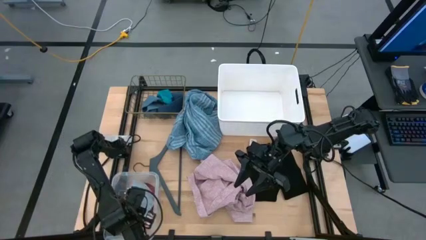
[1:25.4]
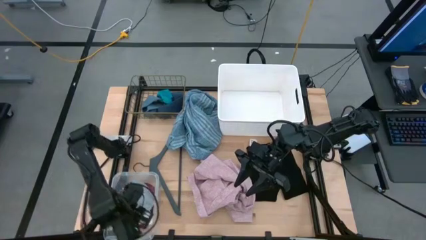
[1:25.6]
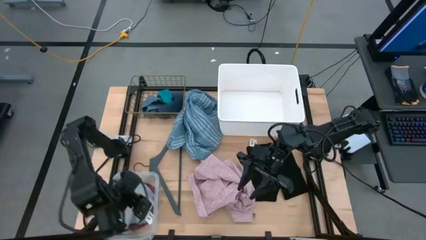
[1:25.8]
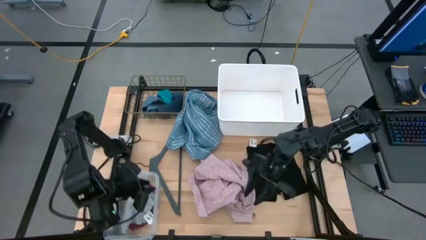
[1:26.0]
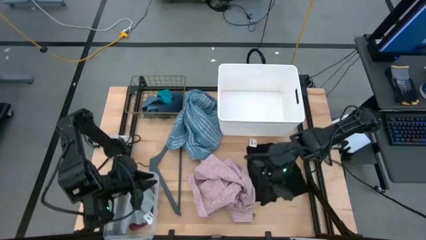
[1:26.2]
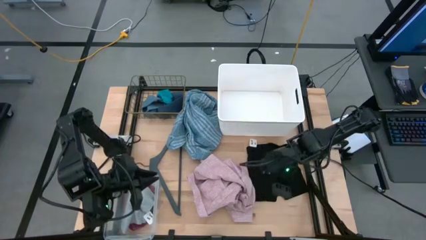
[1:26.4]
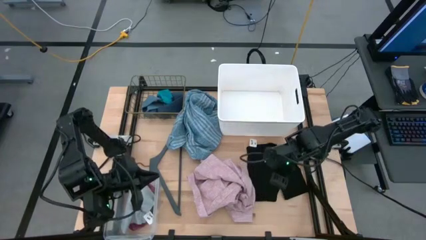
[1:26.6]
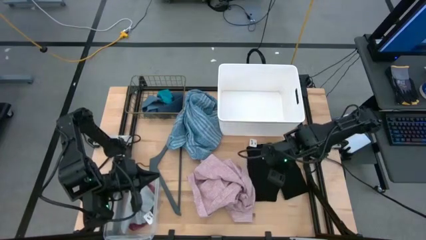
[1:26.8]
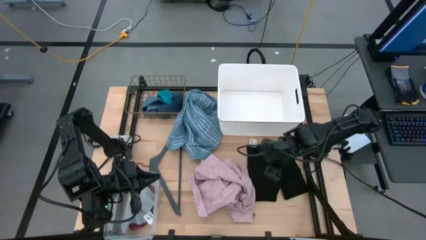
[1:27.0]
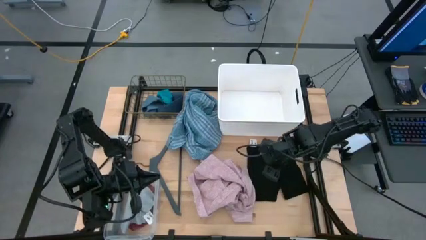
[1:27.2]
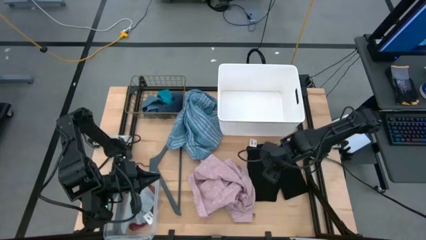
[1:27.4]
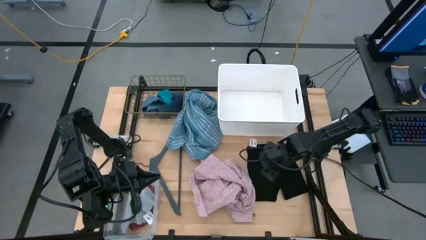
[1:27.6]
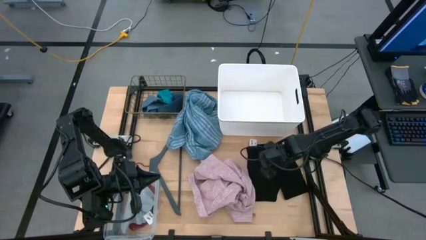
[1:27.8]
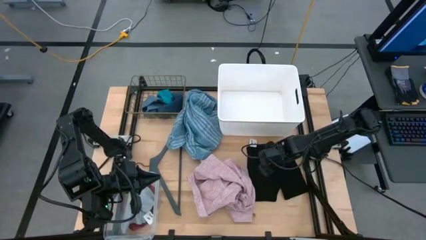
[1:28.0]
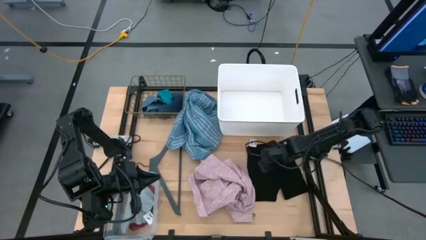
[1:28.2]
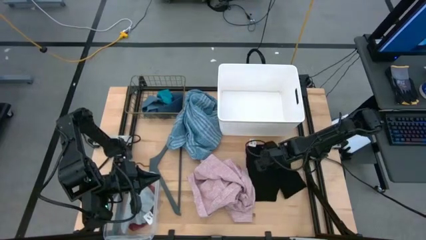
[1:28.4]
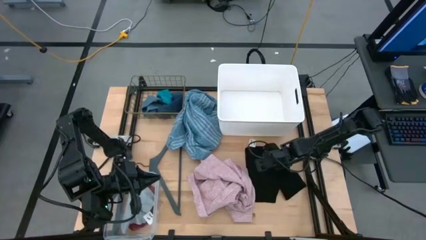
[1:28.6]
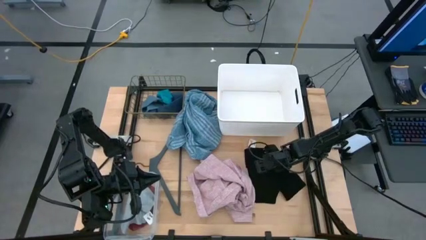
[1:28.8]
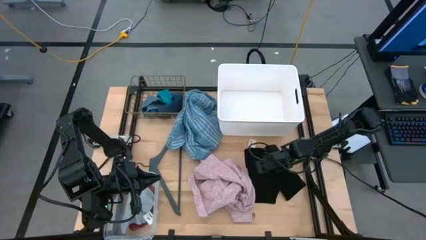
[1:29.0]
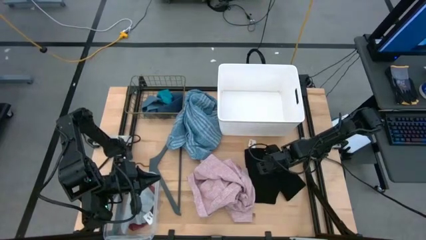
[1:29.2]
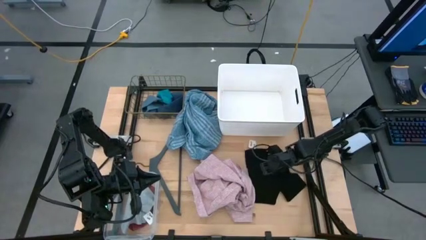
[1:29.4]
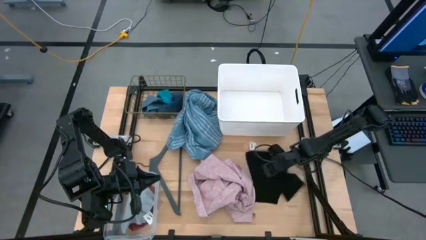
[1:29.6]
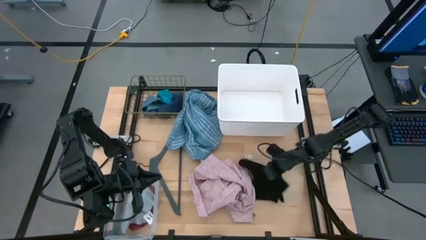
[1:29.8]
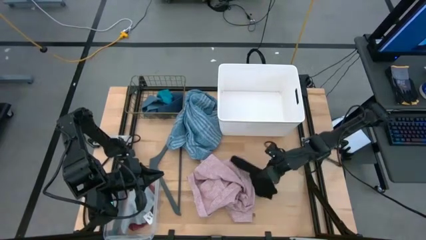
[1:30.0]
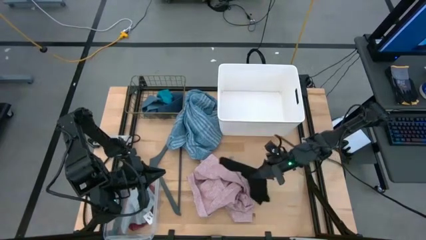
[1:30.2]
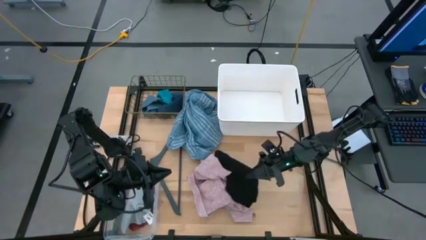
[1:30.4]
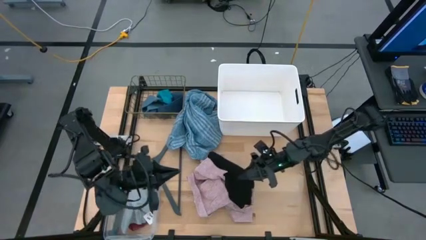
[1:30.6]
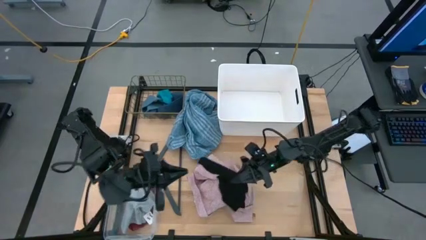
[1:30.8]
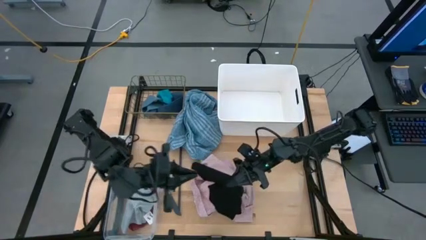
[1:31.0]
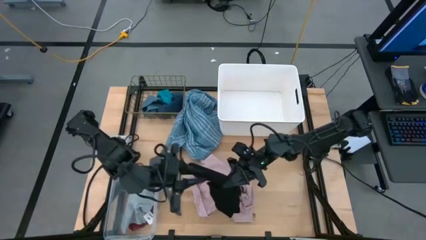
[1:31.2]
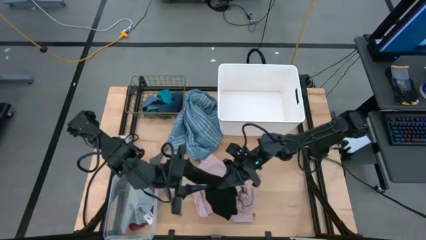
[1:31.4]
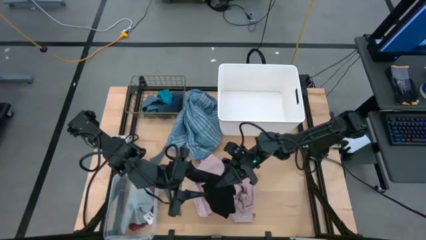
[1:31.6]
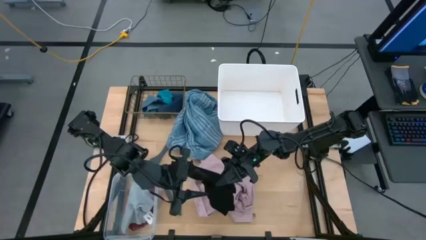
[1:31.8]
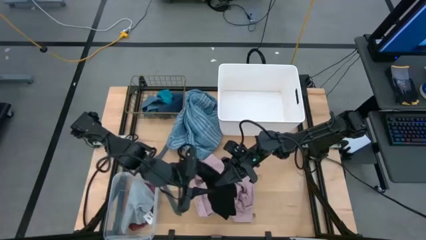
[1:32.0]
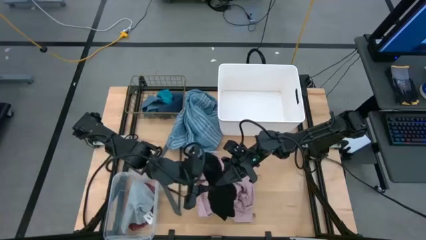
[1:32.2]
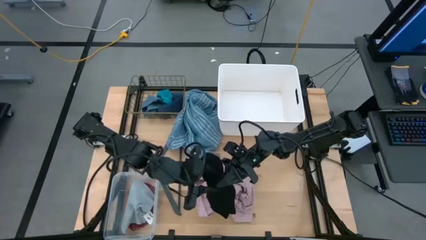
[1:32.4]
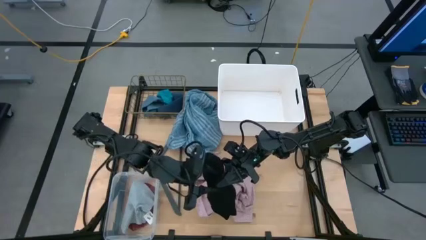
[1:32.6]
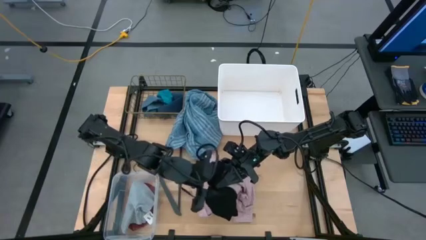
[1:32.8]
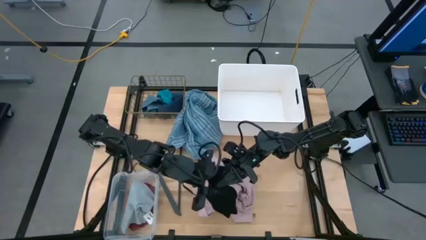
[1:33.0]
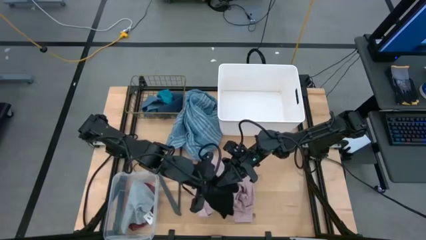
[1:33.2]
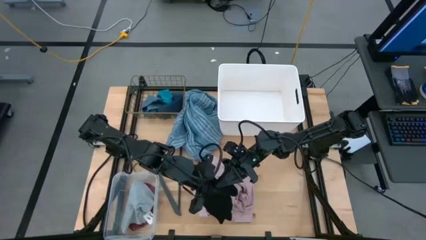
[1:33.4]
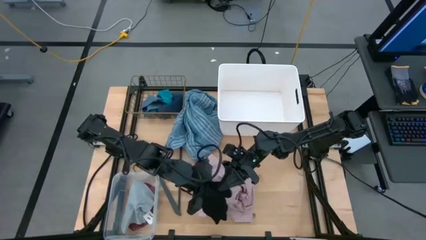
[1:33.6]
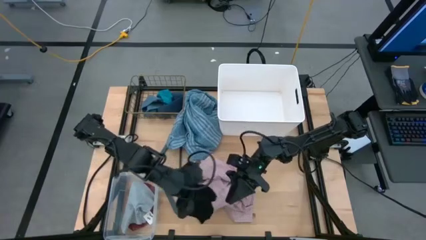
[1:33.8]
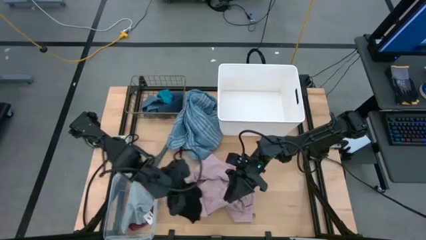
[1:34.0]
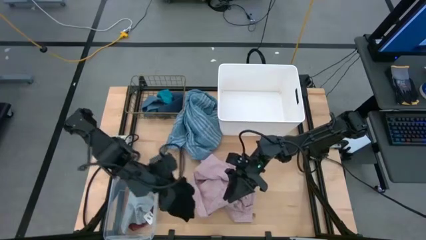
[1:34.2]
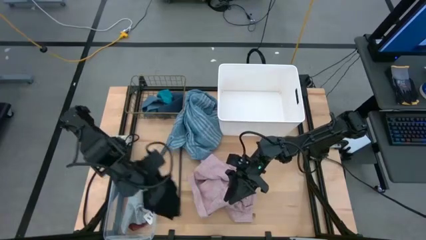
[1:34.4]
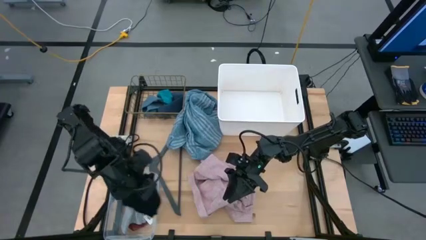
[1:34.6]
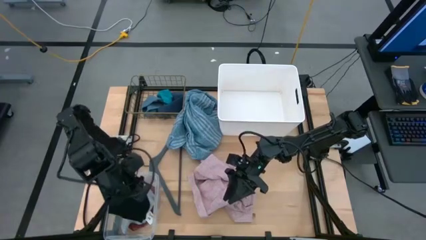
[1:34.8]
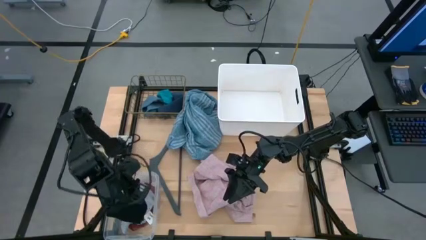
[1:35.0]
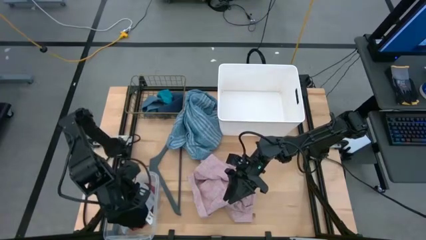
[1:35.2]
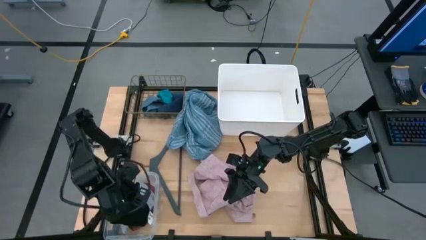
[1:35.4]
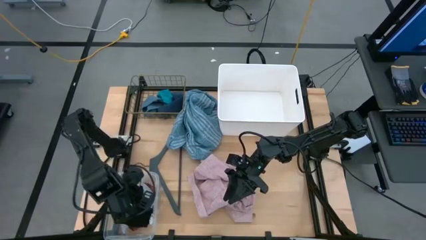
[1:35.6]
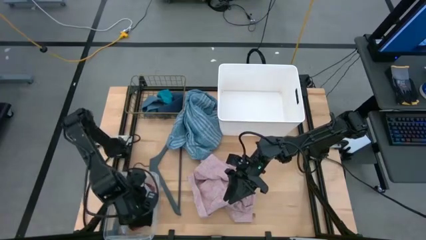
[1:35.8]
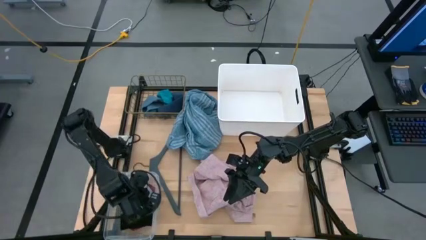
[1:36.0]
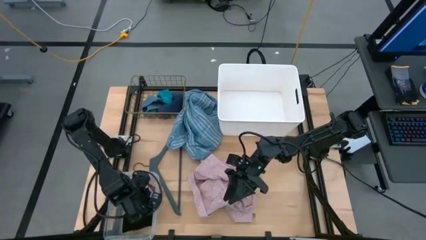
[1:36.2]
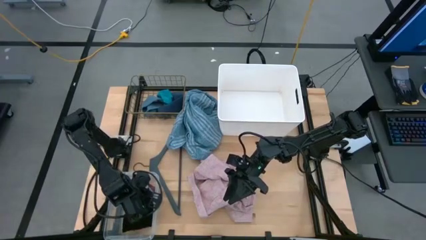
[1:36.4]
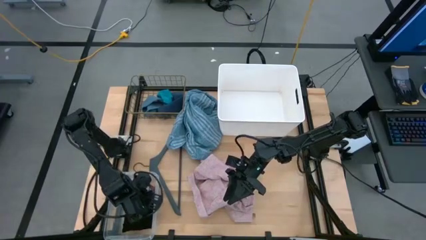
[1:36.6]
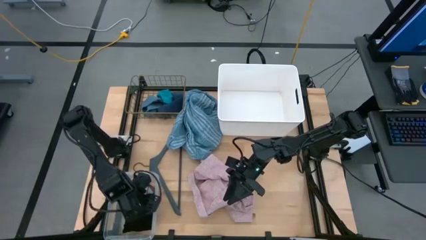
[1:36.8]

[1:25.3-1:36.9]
Task: Pick & Place Cloths
Put the black boxers into the transparent bin

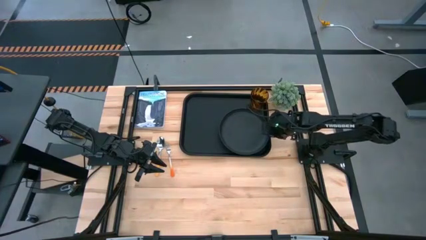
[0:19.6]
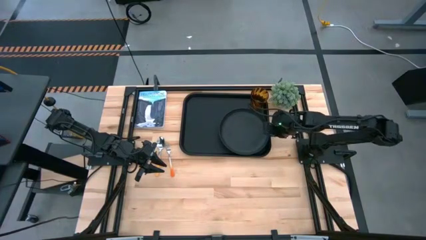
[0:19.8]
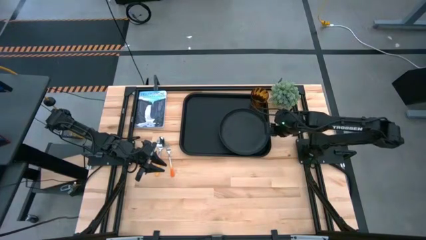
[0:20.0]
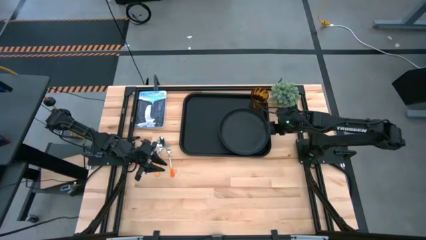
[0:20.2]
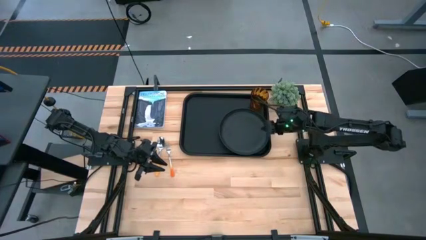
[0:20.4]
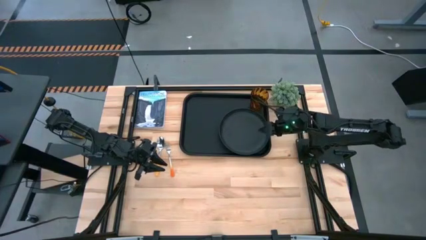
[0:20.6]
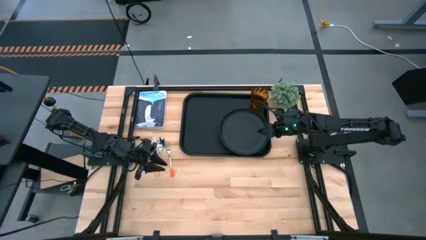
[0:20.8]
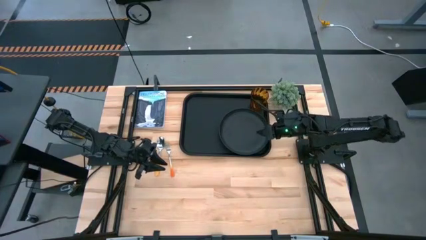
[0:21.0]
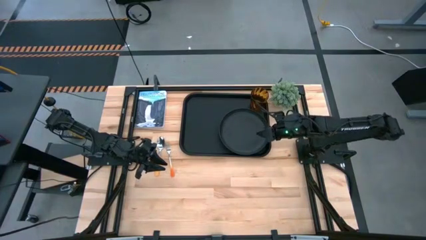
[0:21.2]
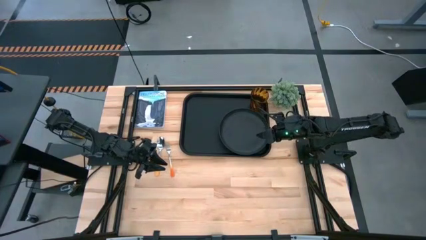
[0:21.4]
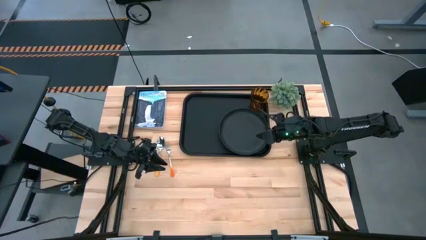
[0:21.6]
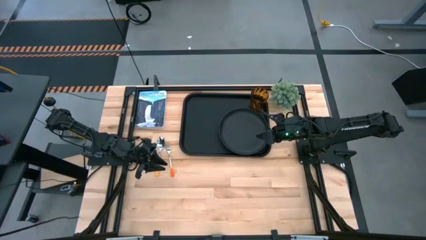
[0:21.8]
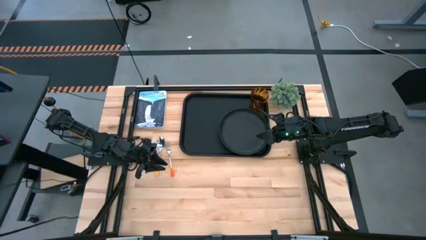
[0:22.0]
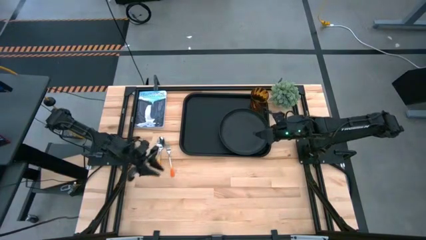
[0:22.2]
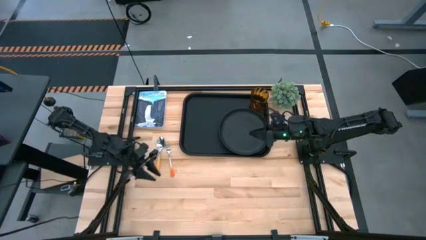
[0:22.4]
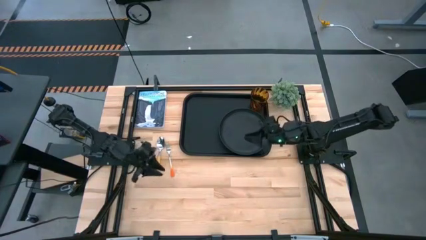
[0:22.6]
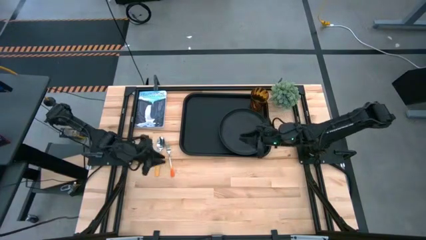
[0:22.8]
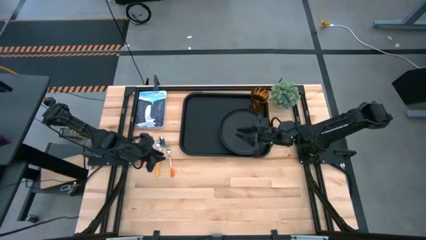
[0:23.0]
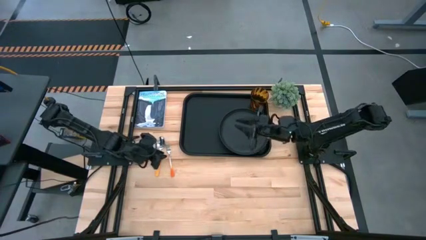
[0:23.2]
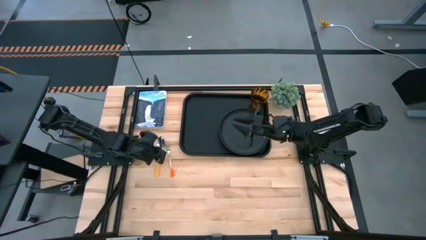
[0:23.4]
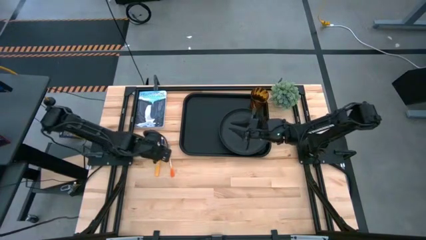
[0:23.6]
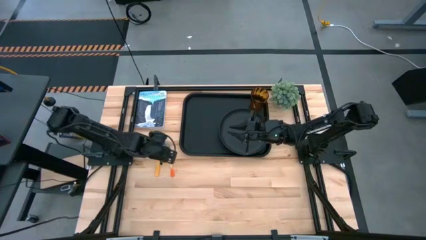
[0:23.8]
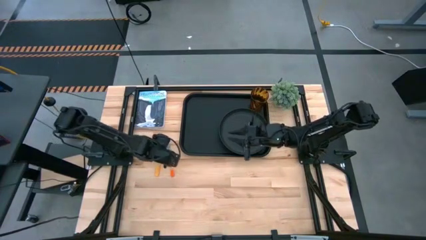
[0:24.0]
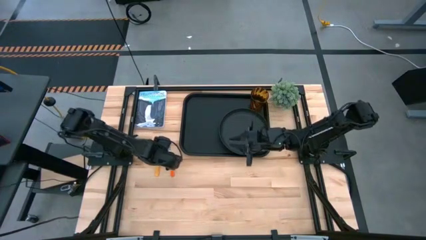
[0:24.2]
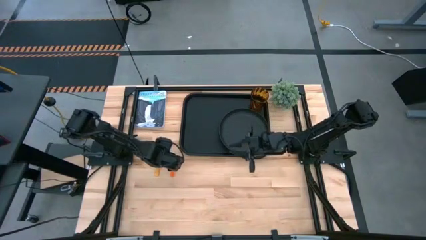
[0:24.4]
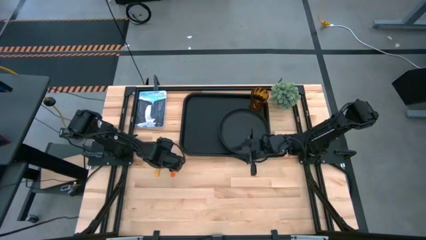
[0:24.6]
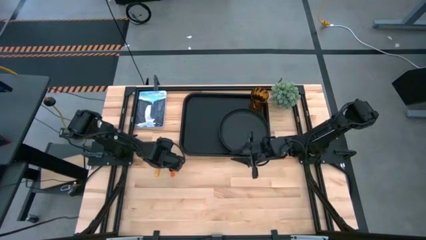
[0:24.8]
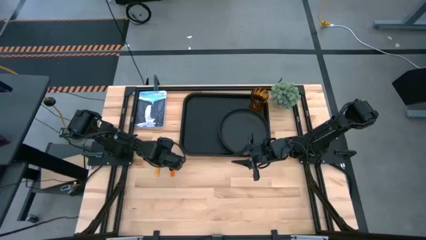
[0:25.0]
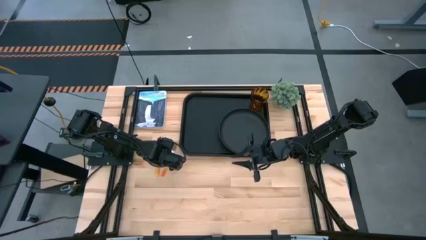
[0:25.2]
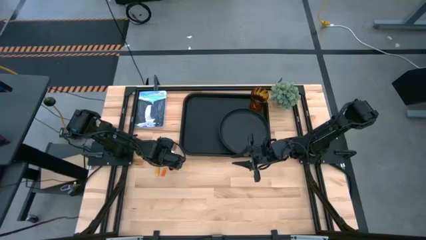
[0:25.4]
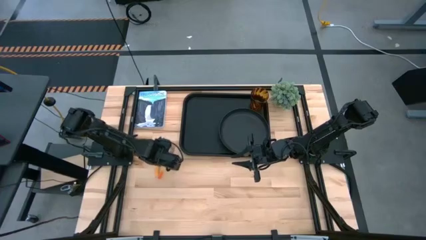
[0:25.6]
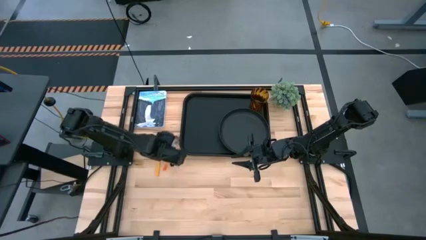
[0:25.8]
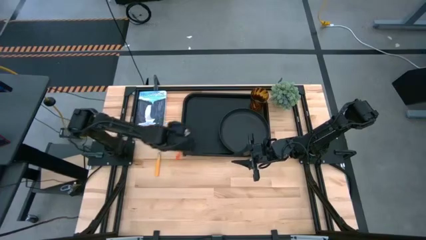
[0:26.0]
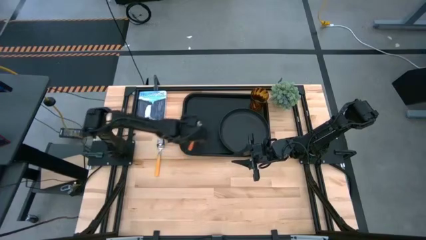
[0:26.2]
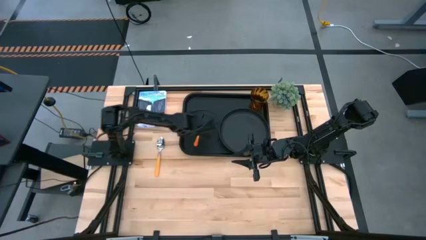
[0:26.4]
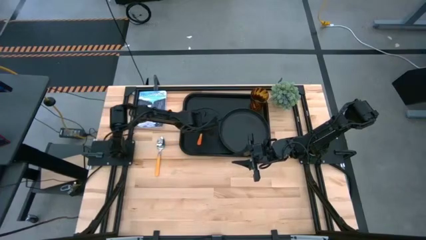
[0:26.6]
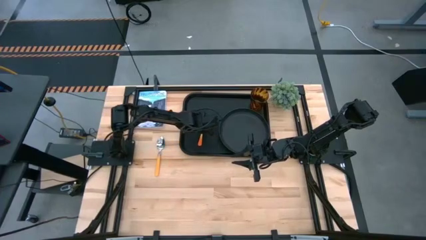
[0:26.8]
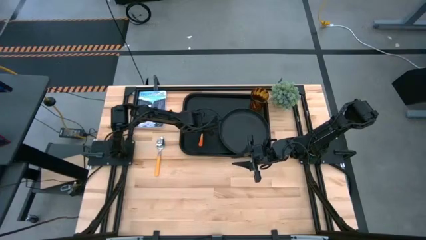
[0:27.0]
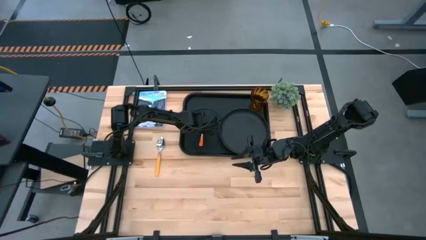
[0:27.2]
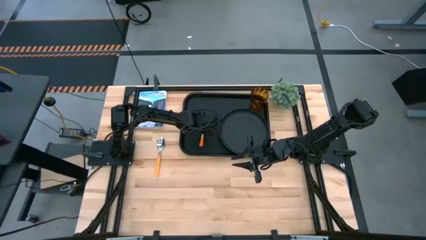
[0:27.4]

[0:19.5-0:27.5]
Task: Pick and place plate/cup/fork/spoon on tray
Put the orange fork on the black tray to the left of the black plate
